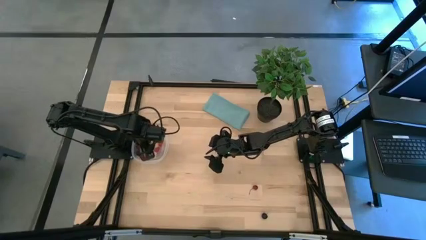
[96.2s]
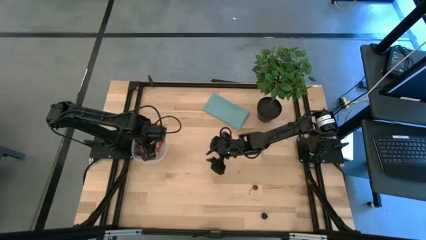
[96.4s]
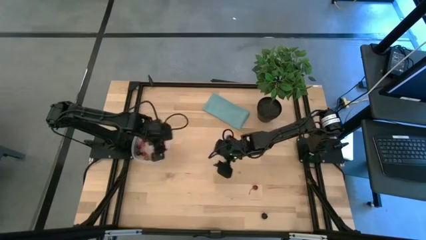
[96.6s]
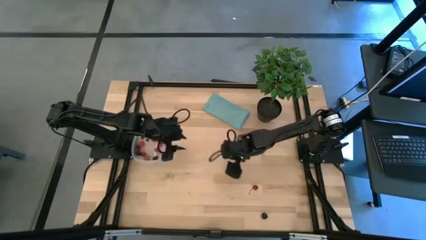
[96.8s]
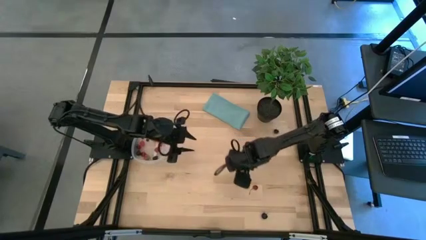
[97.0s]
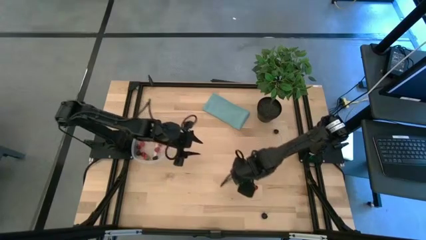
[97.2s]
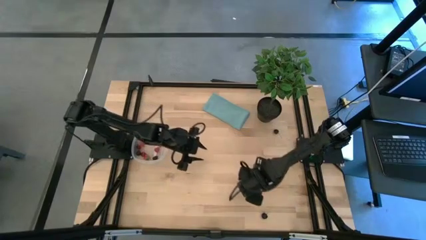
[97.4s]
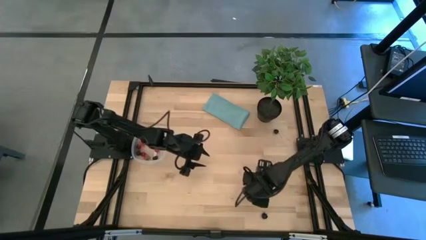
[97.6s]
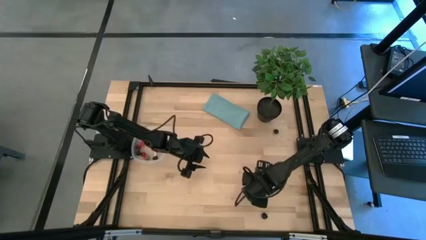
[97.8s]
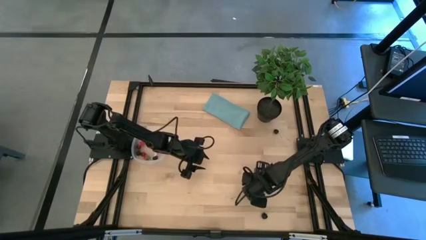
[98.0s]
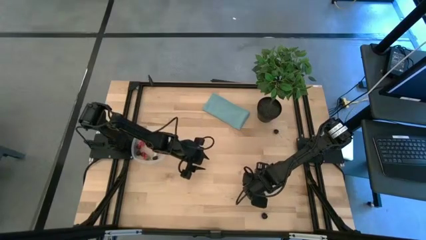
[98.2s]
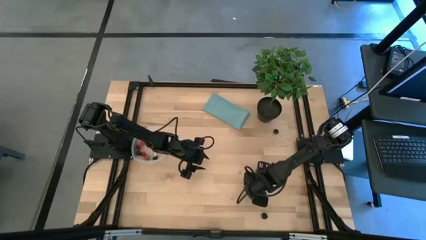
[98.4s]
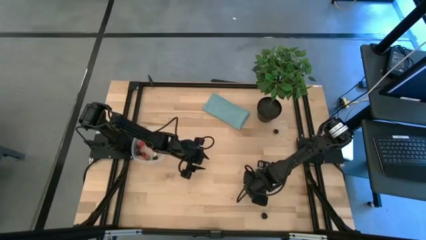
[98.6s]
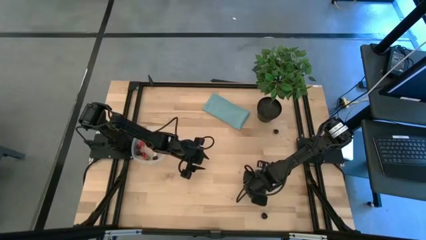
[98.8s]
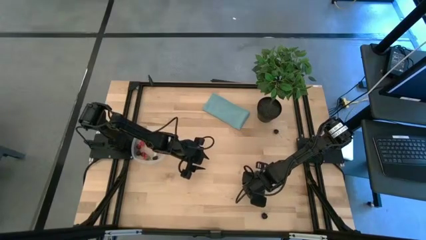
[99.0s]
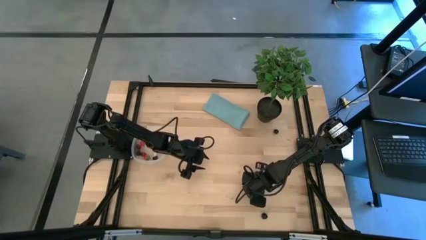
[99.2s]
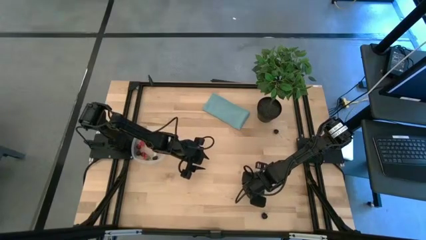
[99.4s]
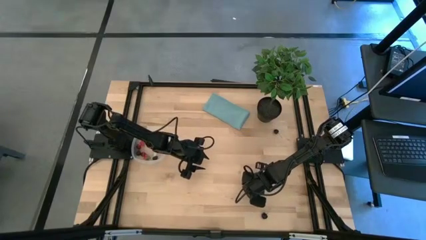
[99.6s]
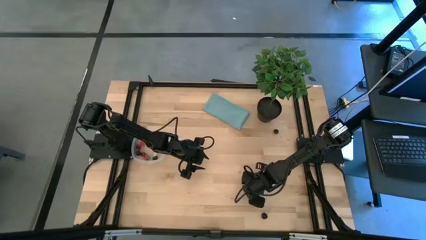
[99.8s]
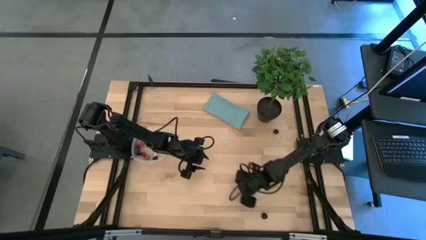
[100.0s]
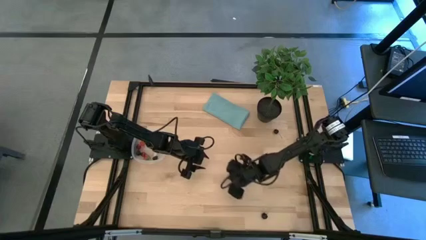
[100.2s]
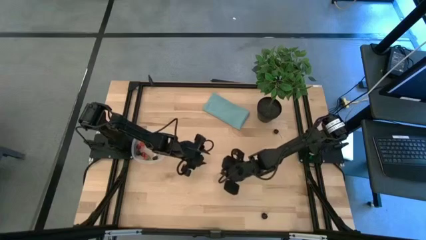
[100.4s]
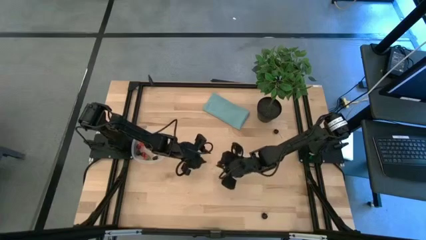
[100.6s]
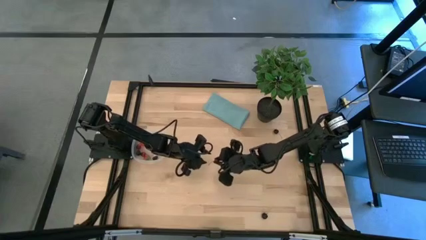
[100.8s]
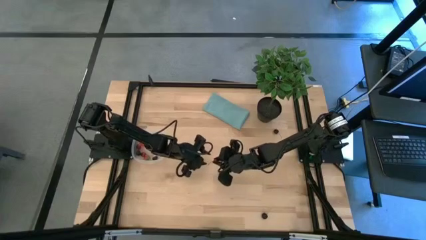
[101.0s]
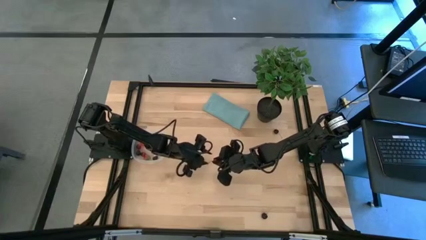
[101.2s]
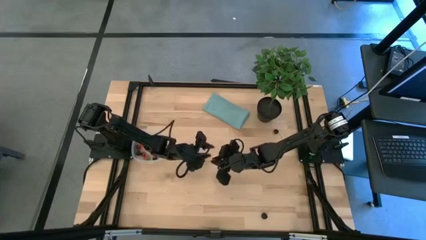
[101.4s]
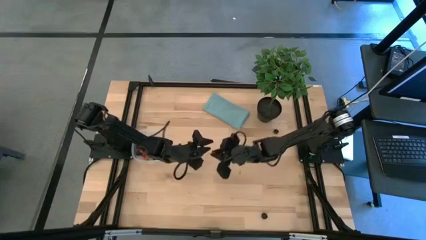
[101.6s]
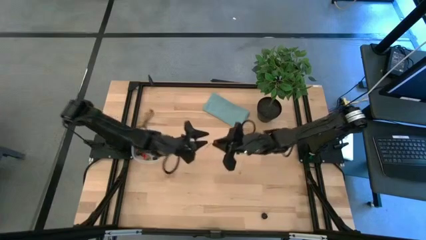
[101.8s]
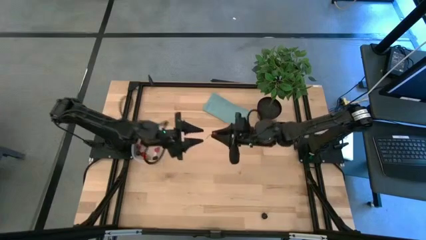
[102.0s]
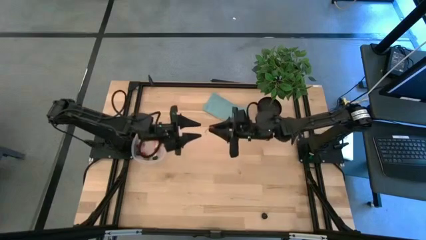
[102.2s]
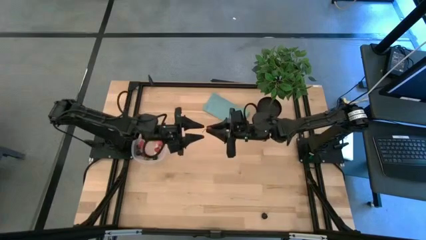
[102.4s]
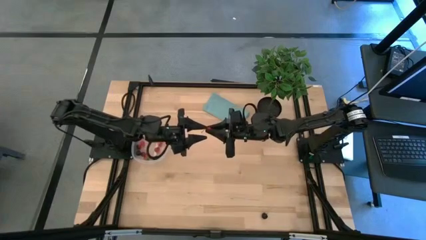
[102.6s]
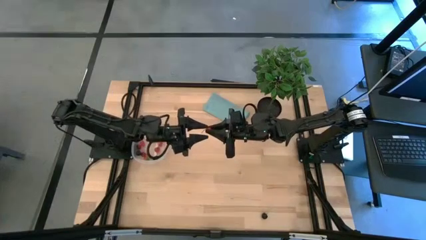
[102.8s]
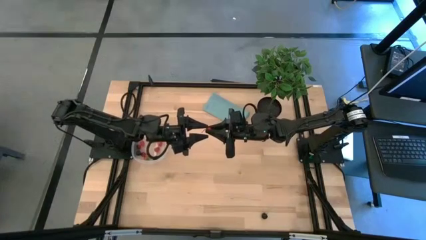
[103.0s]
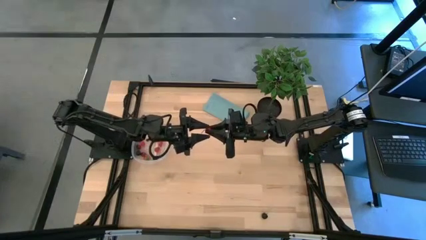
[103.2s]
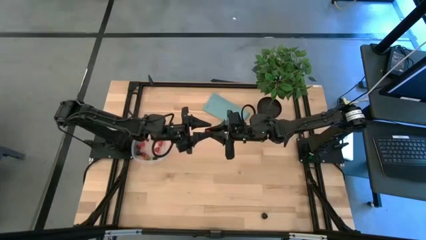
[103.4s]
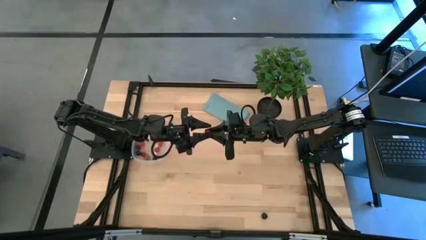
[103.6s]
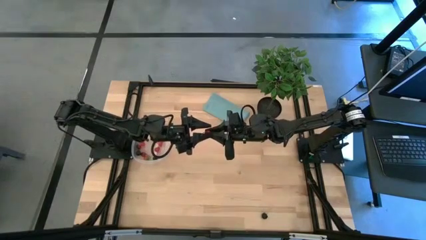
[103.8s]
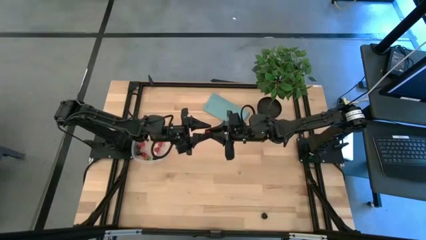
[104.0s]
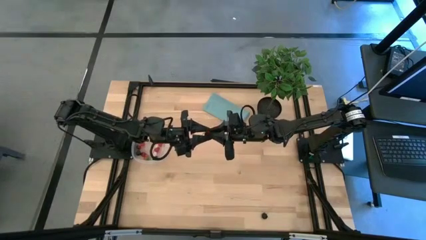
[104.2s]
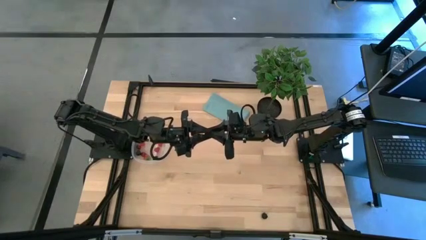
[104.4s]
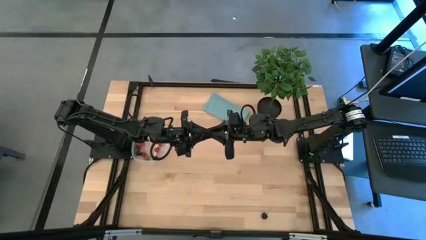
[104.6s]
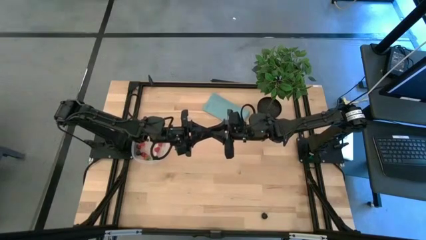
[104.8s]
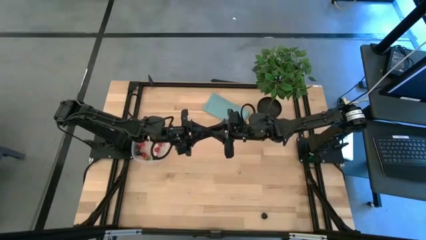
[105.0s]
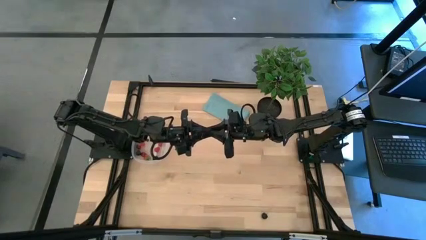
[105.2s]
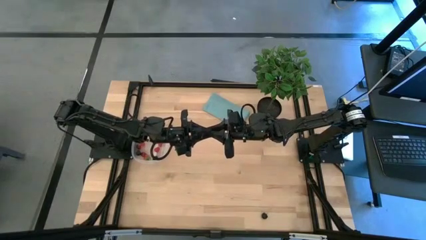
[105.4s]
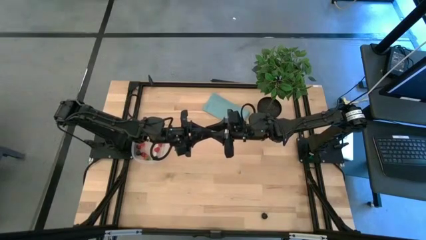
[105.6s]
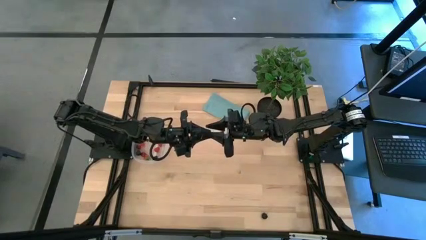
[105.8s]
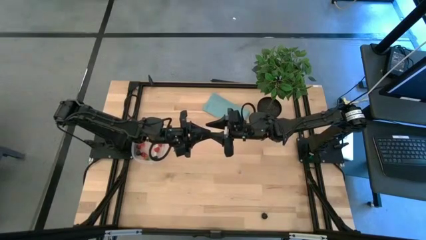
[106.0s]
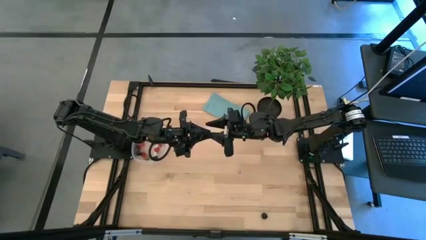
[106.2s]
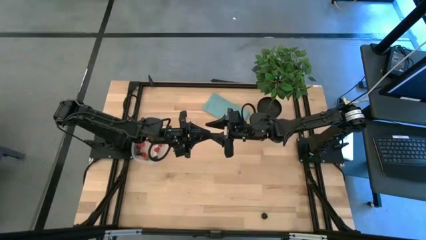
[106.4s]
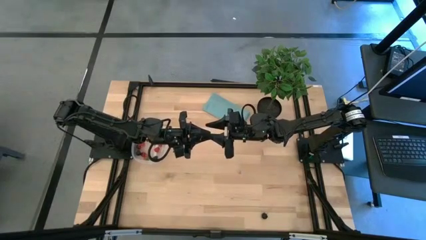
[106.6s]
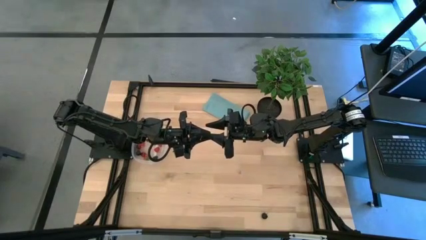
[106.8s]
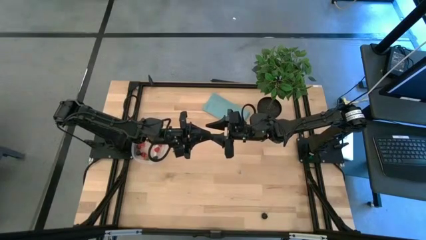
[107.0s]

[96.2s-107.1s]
Task: Pick and placing Produce into tupperware
Put the red cherry into the transparent bin

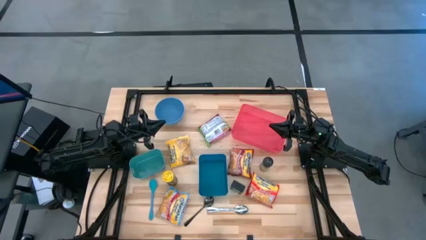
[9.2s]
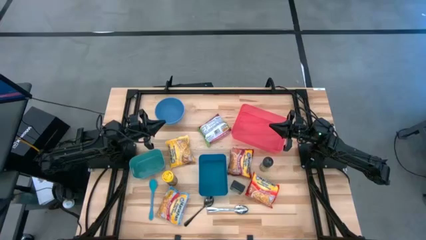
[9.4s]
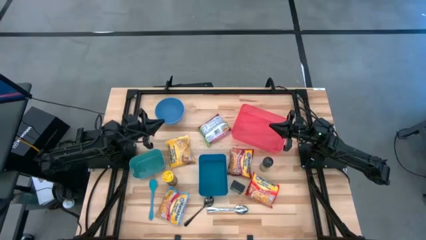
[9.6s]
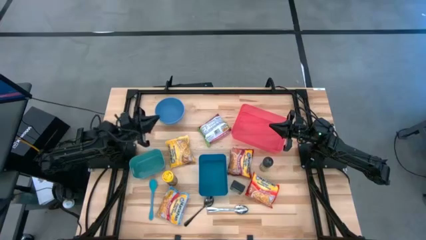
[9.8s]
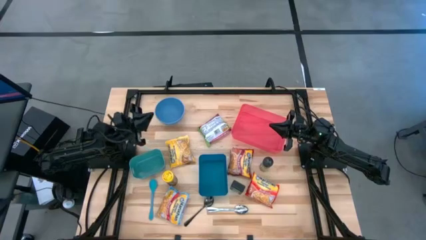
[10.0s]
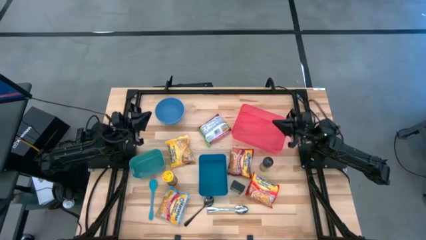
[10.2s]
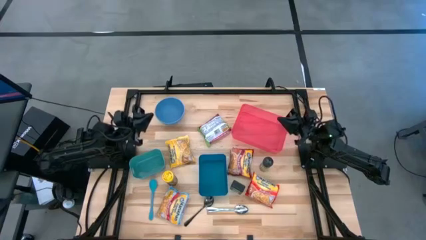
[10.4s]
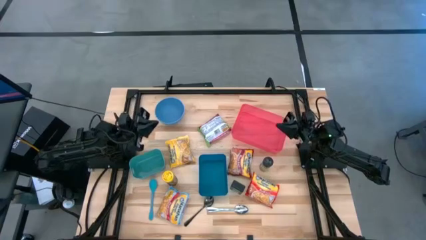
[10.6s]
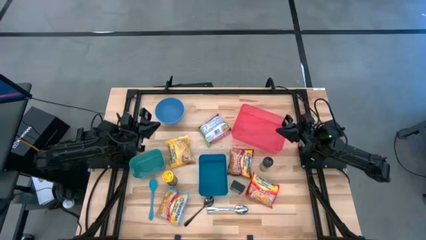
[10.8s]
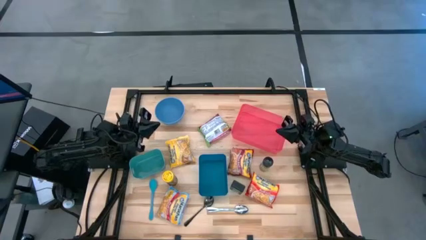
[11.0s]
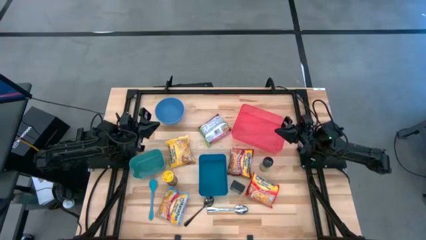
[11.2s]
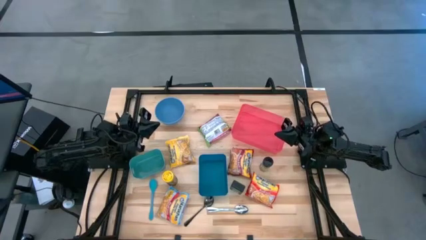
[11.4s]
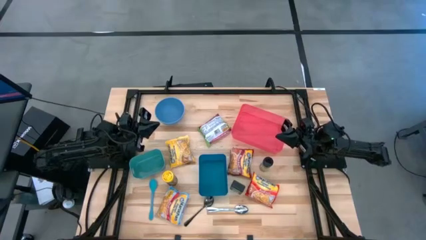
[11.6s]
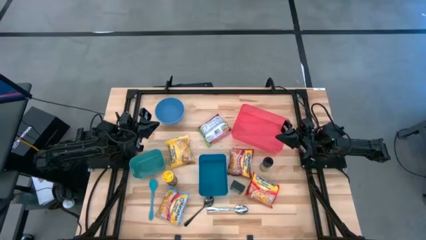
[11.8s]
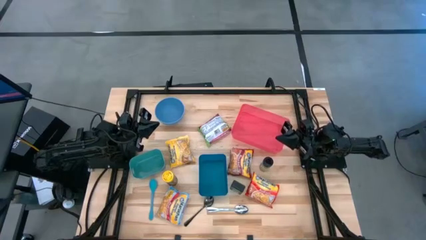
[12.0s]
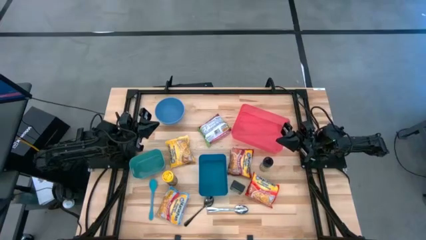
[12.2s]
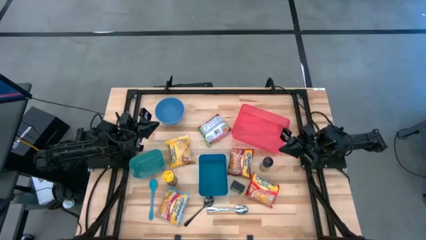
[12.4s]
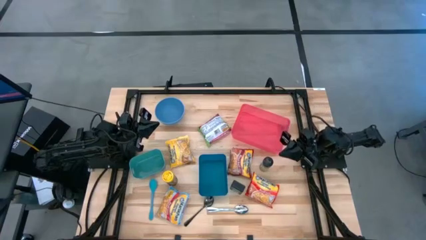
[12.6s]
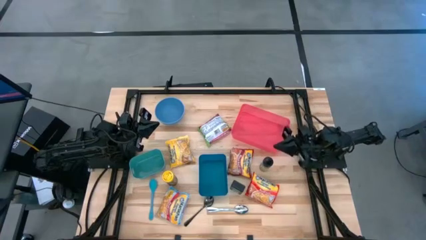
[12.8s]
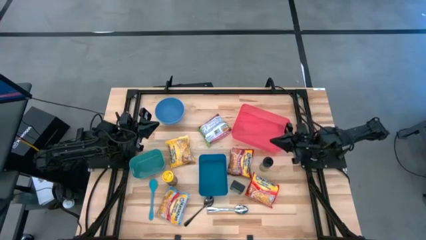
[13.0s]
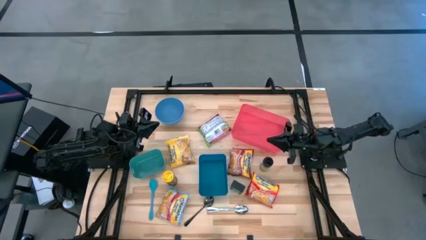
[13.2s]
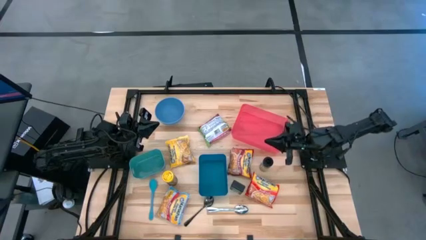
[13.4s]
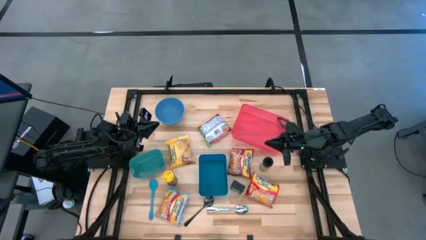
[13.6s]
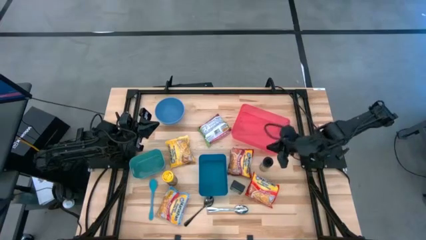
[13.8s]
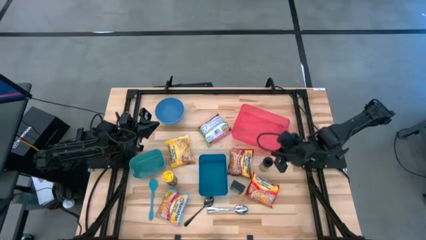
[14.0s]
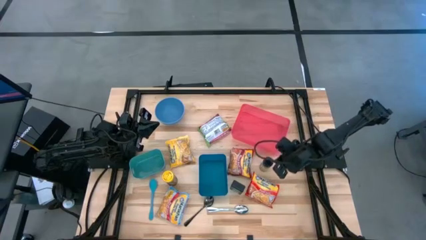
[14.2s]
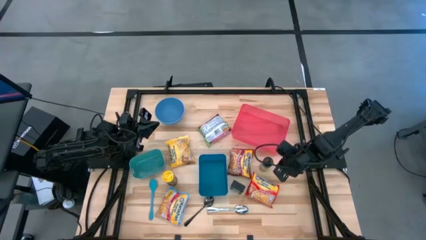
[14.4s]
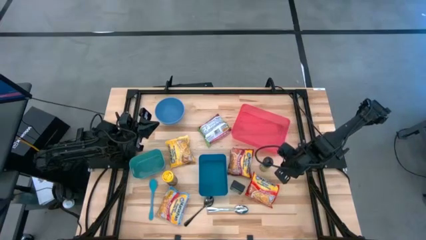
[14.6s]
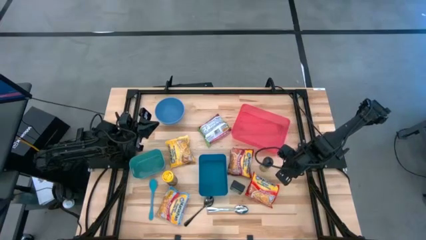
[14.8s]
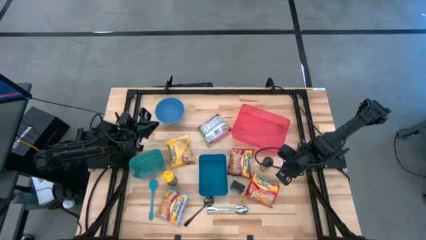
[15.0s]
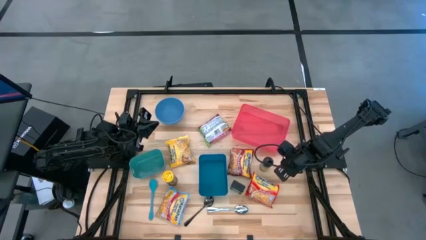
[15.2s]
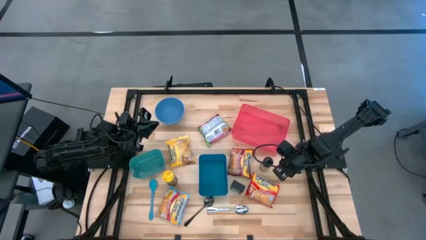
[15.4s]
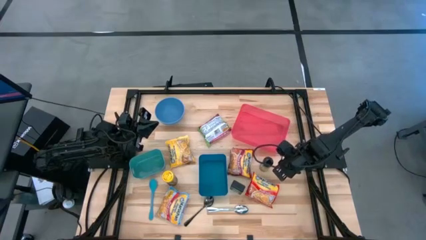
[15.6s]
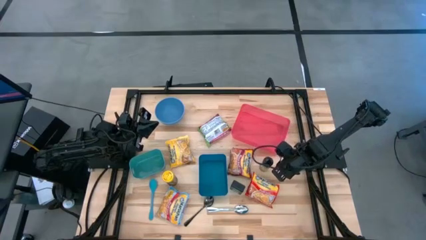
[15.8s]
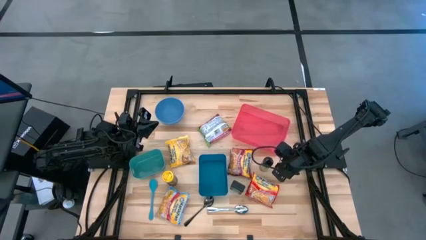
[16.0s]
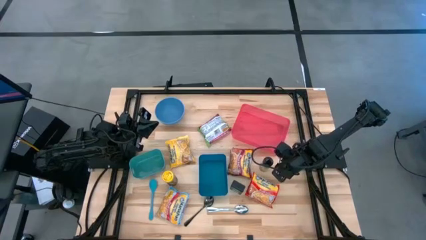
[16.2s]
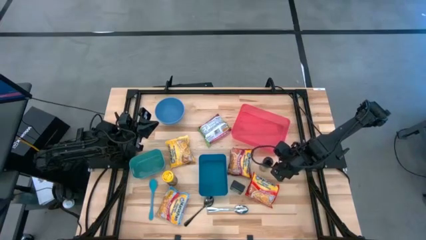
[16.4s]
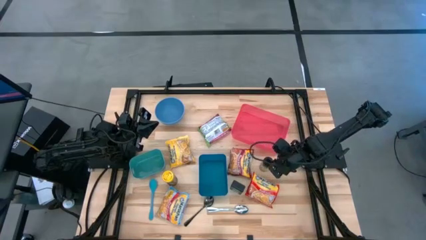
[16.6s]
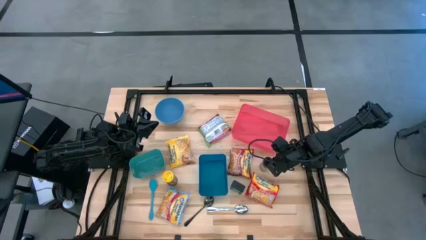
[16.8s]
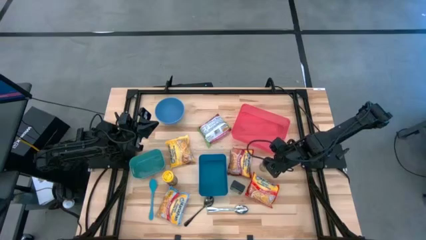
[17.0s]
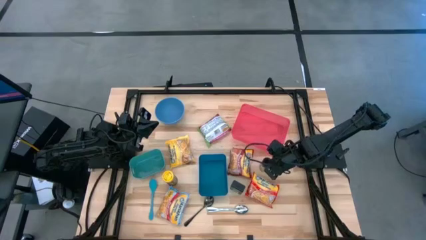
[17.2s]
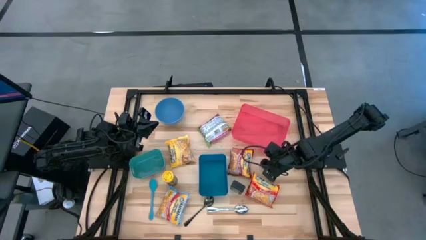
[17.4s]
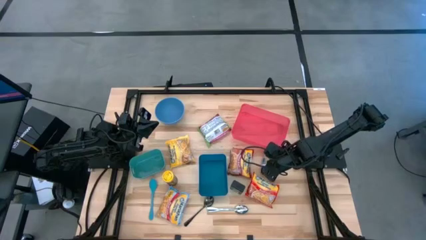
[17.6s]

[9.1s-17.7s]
Task: Pick & Place Food Item
Put the green seasoning bottle into the blue bin
